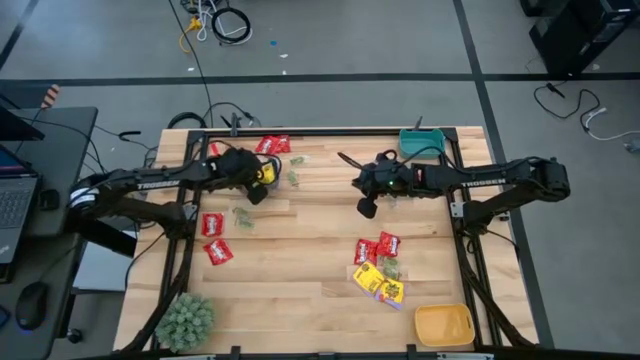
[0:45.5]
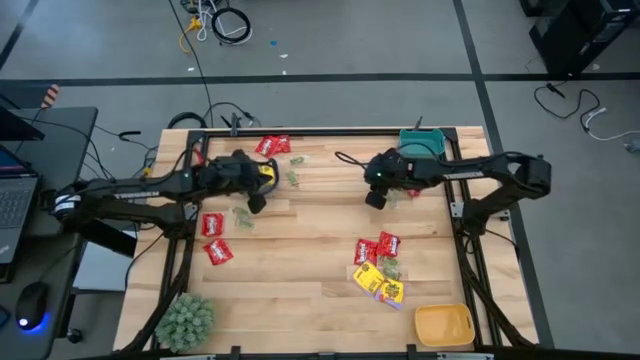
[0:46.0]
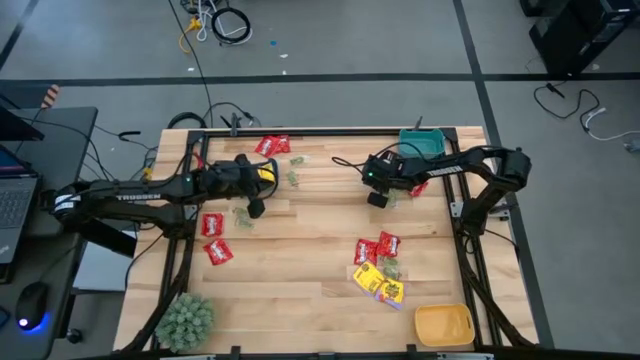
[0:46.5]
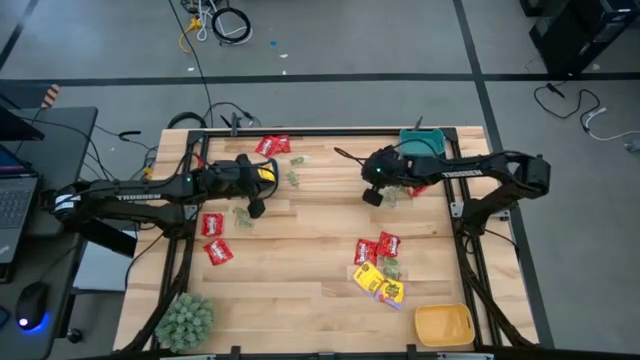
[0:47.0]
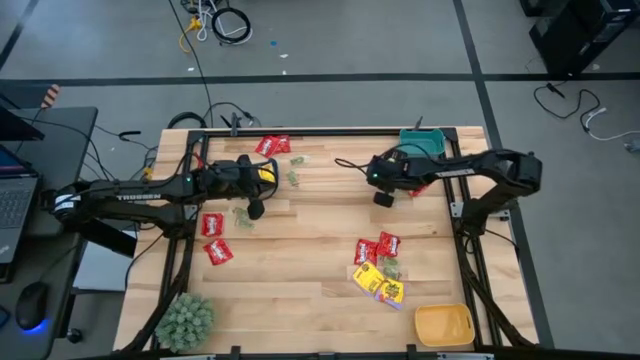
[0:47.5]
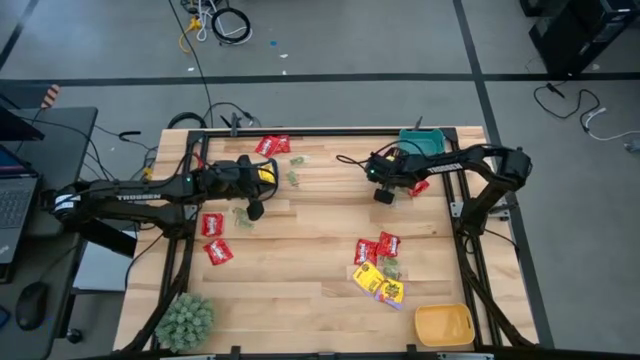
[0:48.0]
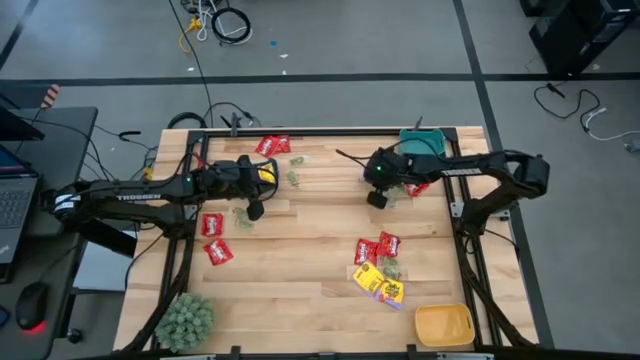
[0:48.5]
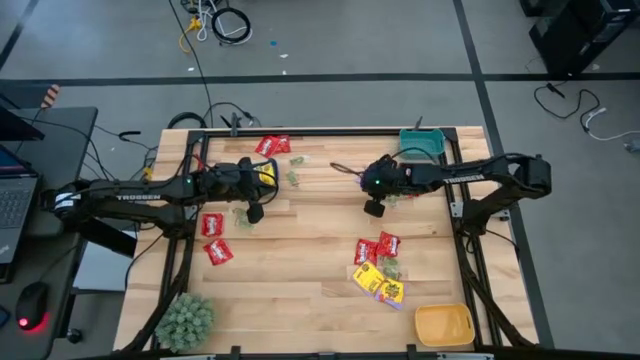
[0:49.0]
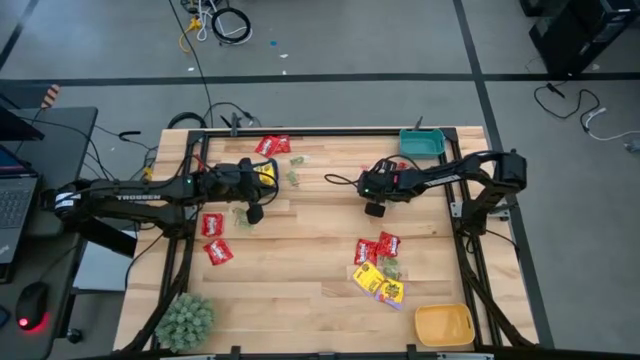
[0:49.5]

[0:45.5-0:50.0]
Task: Sort candy
Put the yellow candy into the dark blue bin

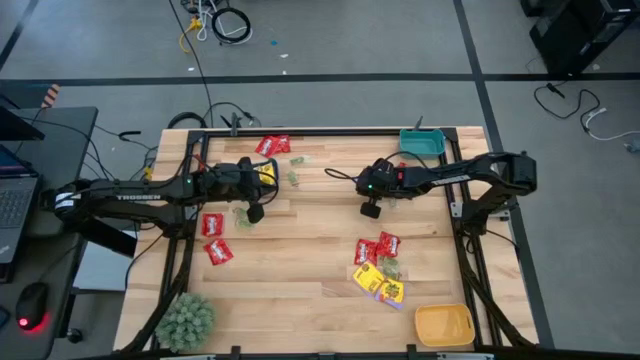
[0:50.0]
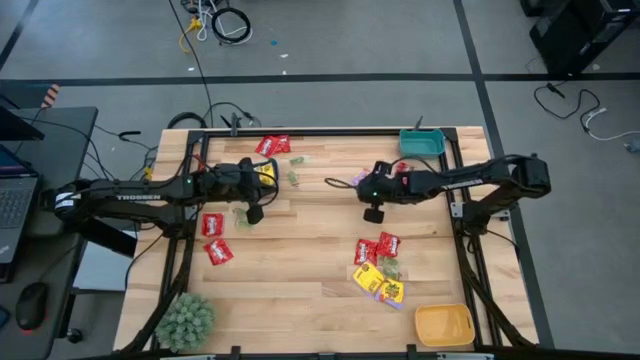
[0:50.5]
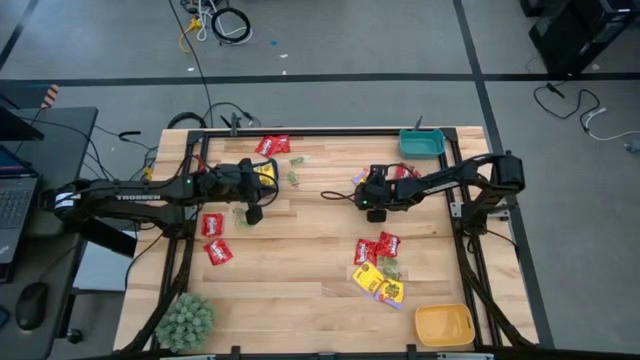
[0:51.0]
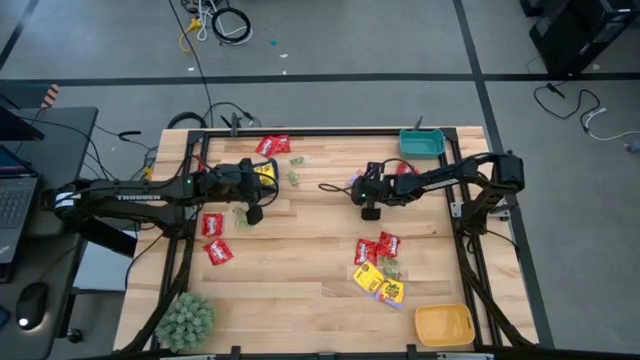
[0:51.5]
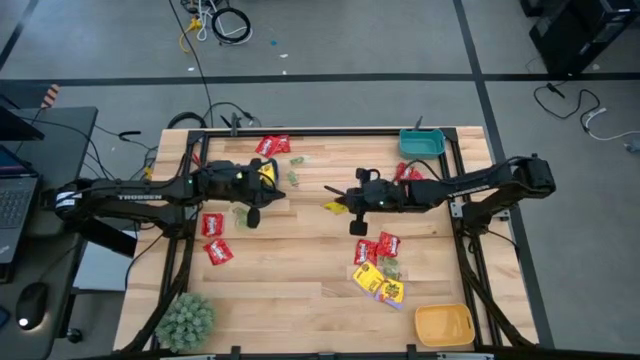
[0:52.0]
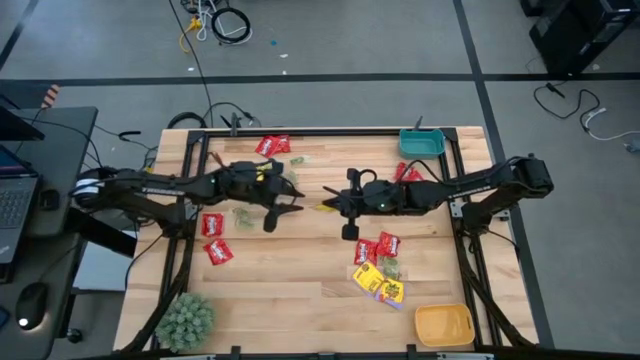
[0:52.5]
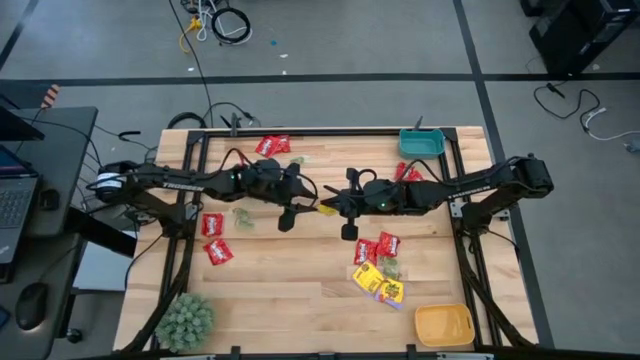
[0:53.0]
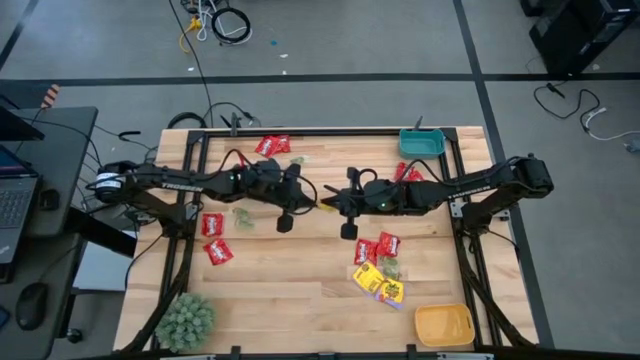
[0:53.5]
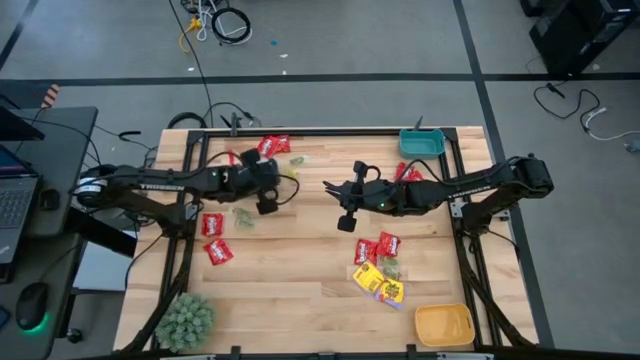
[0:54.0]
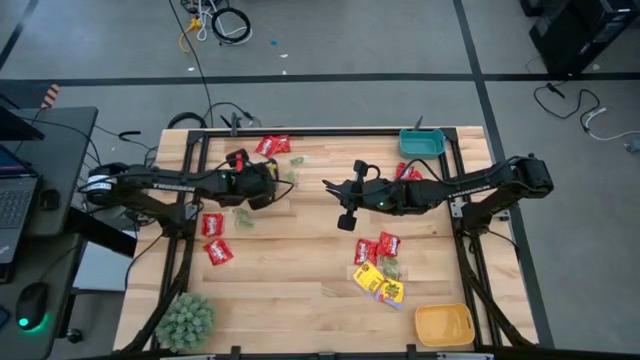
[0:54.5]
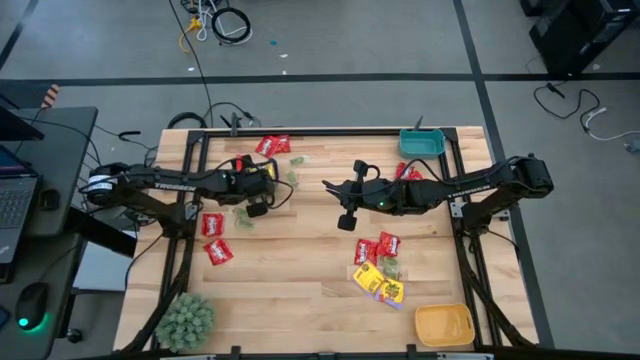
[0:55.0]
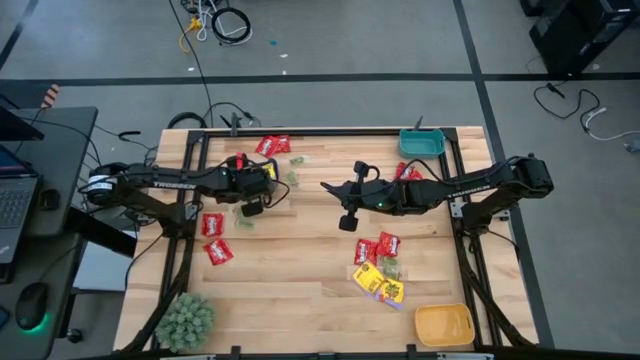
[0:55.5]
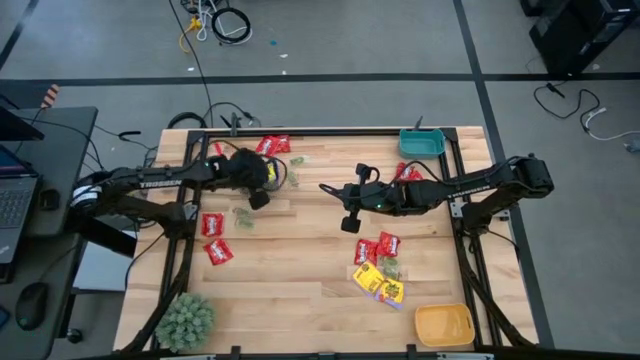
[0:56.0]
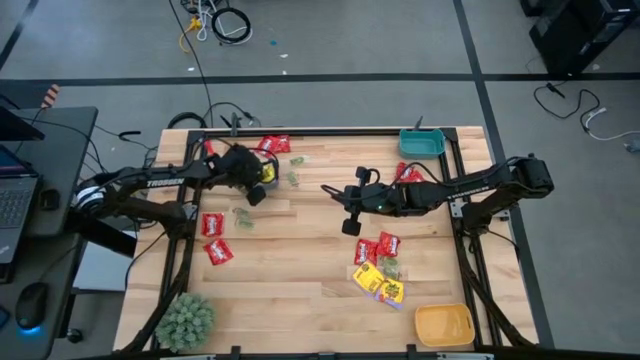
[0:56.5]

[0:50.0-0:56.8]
Put the yellow candy into the dark blue bin

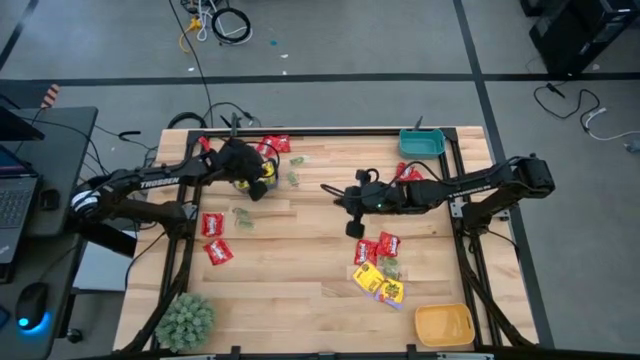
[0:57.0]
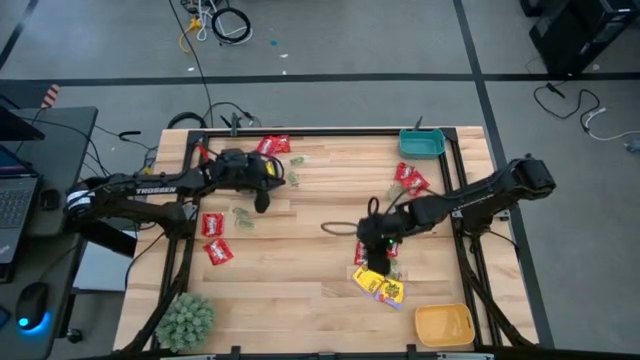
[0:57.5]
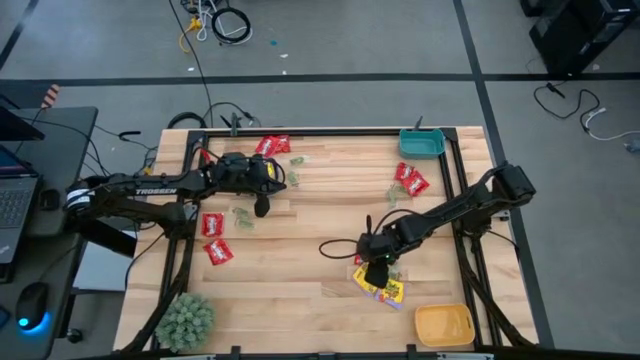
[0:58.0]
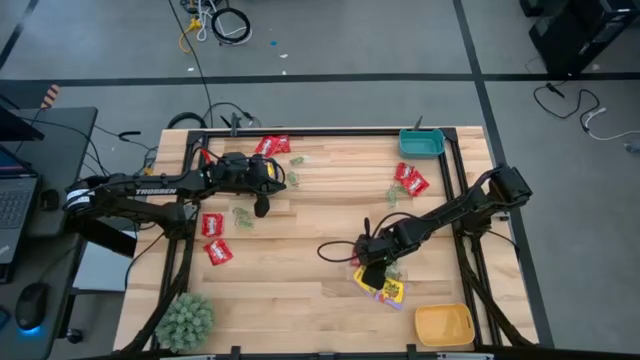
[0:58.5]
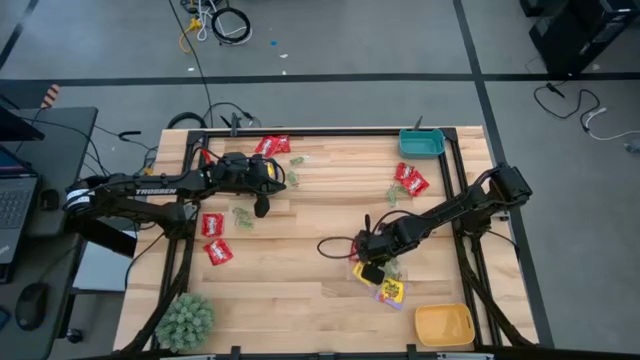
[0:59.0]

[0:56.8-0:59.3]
Put the yellow candy into the dark blue bin

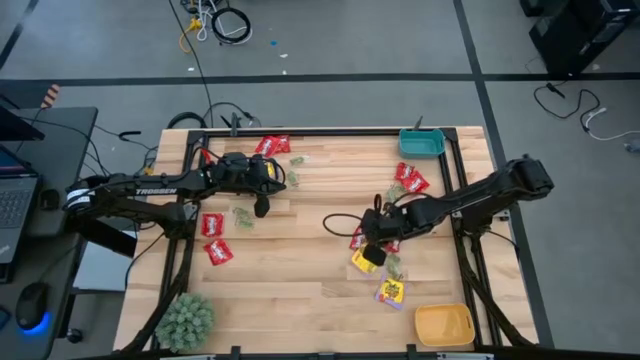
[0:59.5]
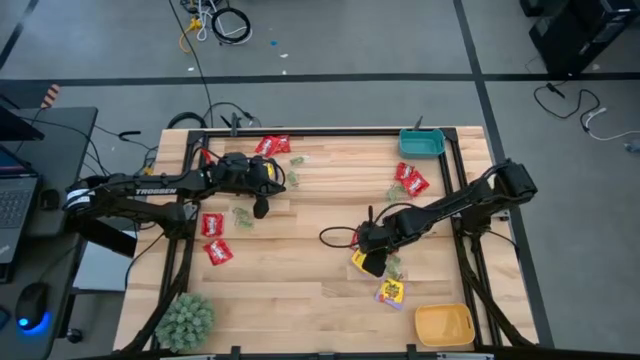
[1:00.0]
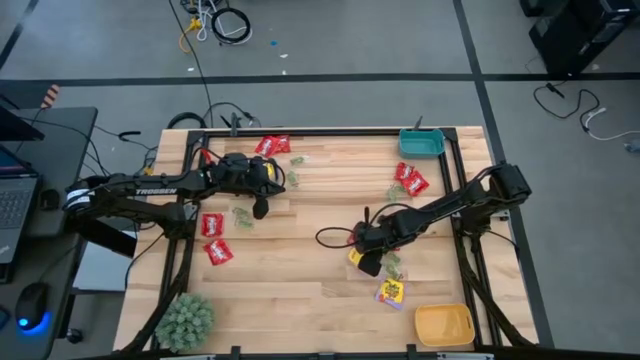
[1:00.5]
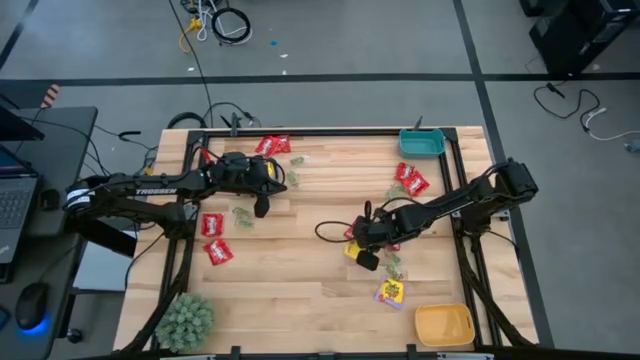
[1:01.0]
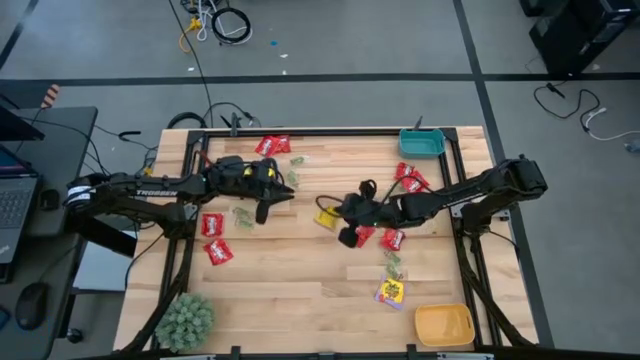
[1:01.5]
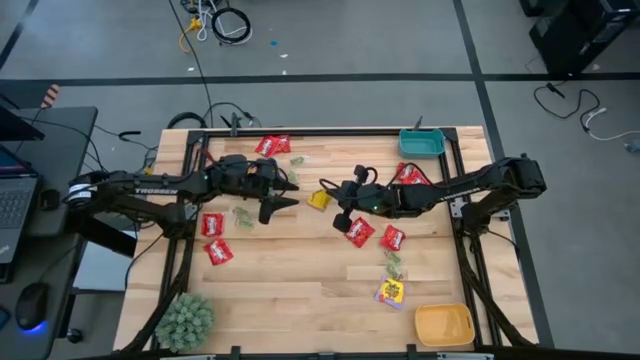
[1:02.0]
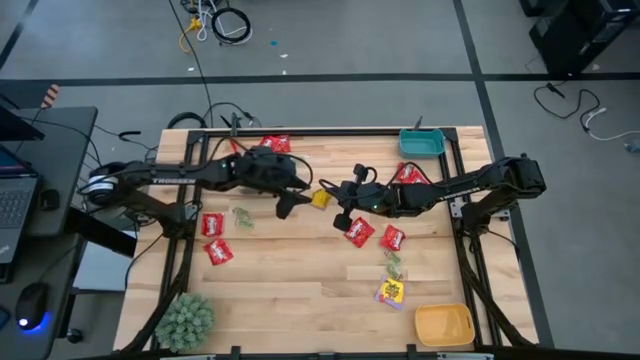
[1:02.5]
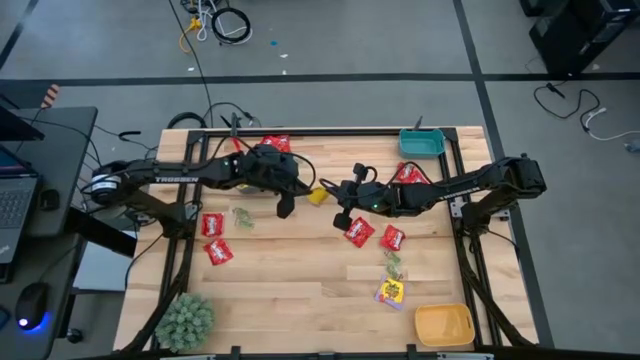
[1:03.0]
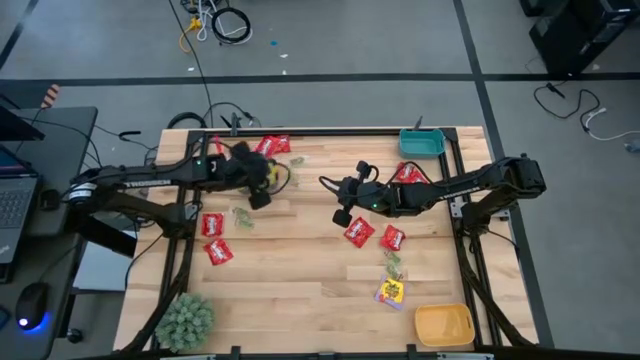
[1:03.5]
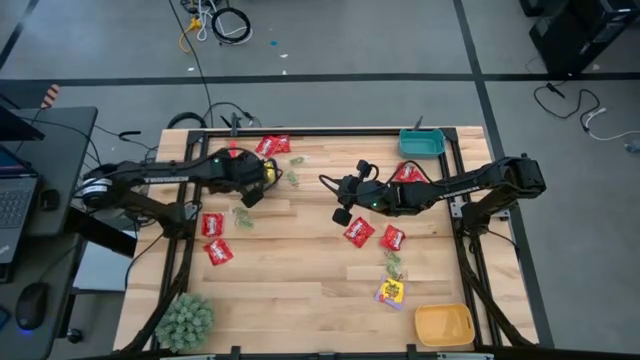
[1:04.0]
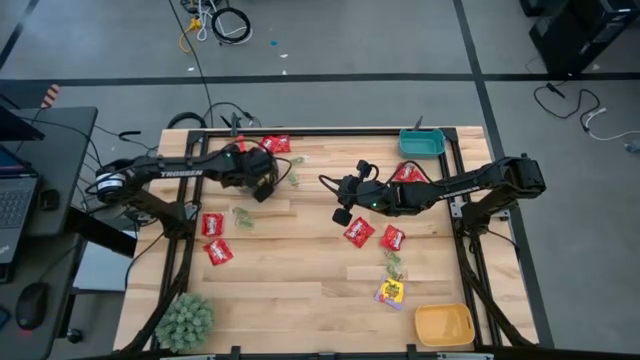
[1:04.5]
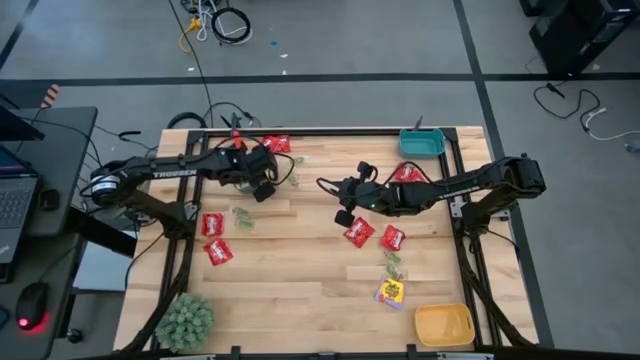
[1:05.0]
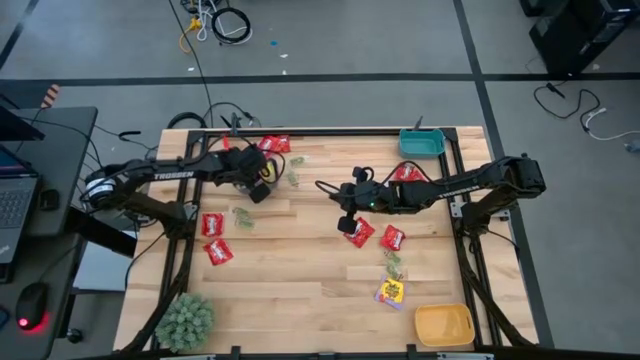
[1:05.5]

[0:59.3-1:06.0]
Put the yellow candy into the dark blue bin

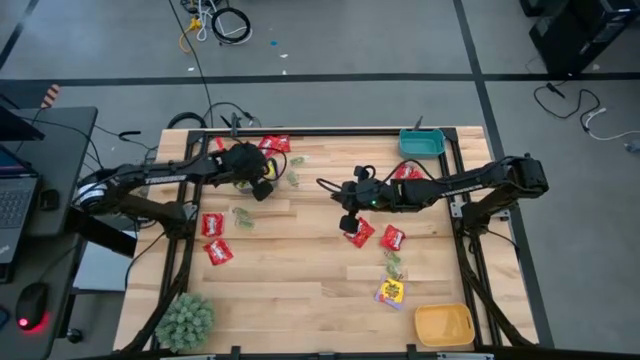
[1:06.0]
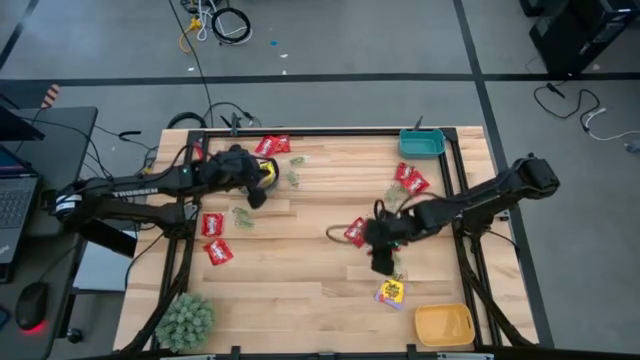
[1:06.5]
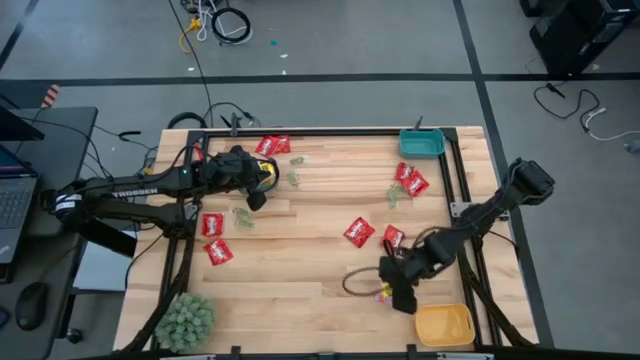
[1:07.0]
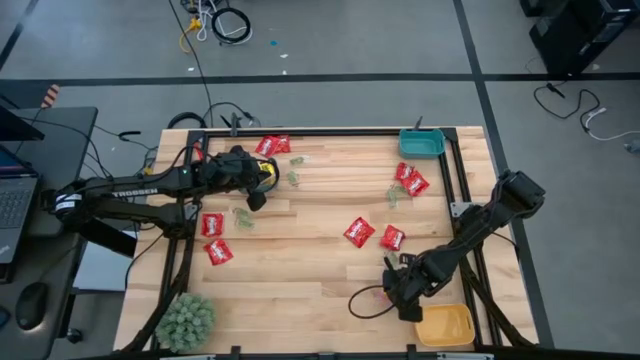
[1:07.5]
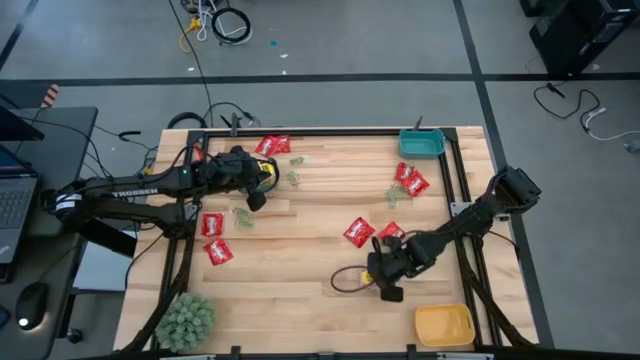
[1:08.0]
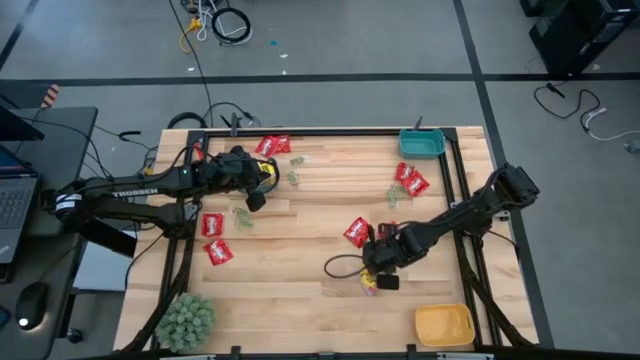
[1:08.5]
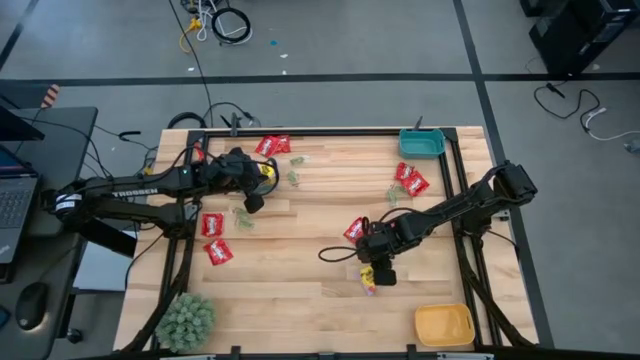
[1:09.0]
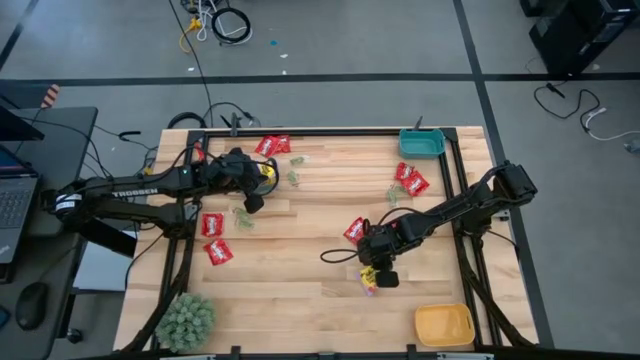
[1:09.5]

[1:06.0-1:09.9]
Put the yellow candy into the dark blue bin
